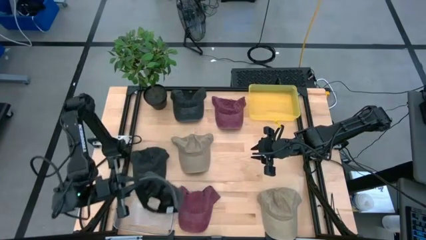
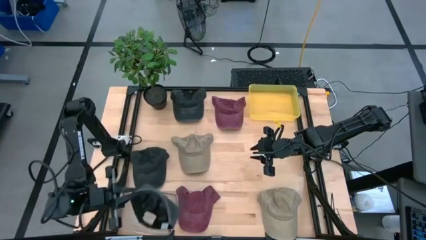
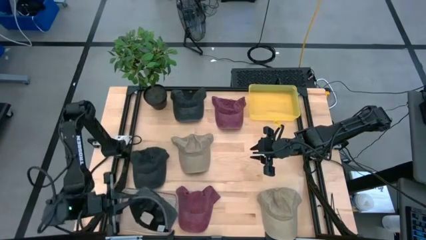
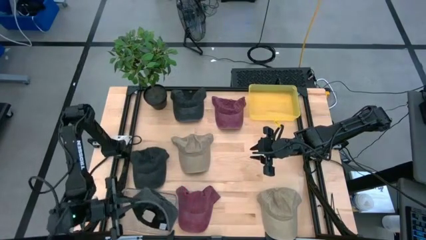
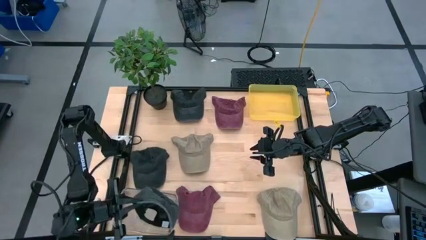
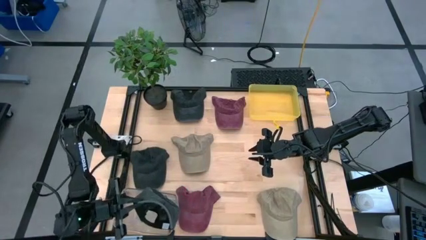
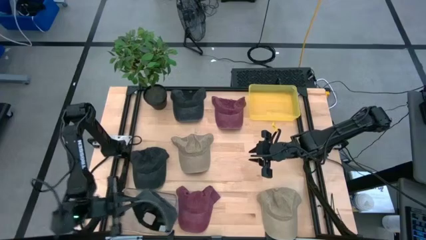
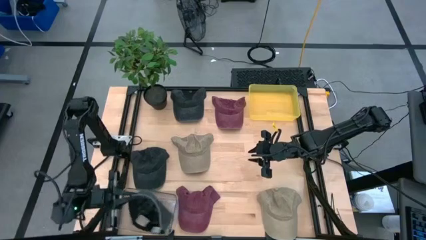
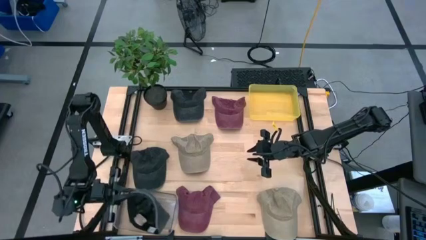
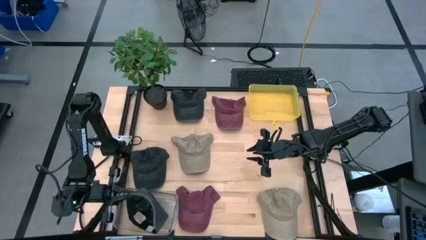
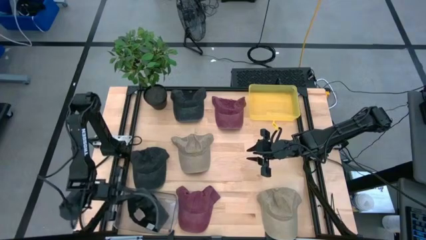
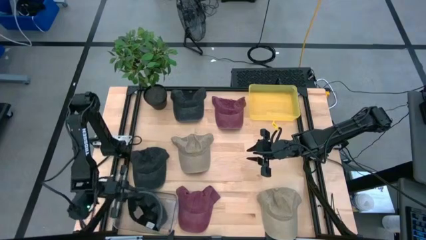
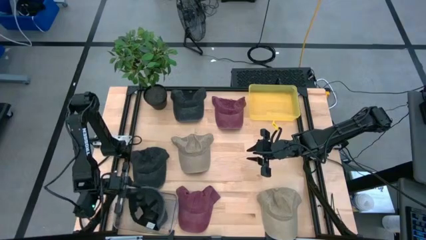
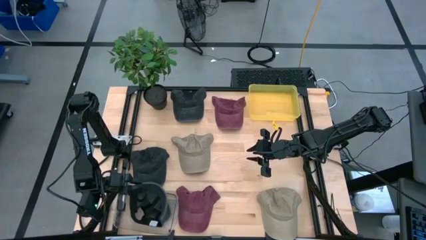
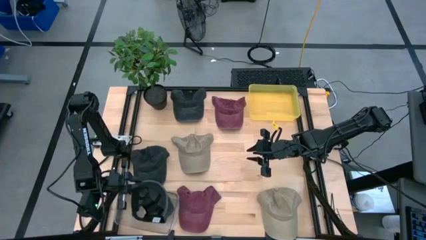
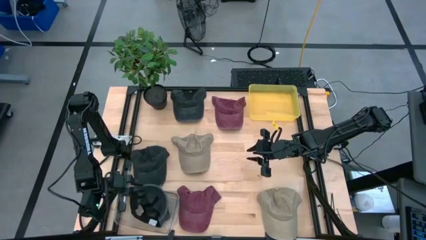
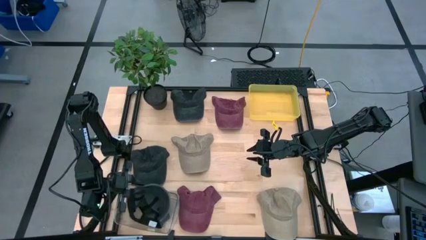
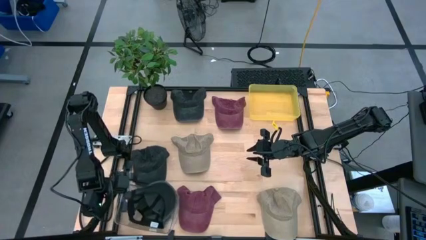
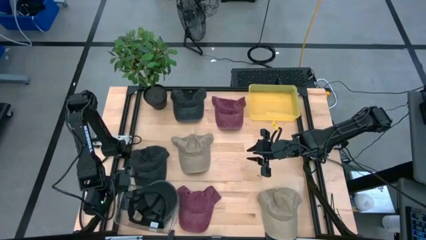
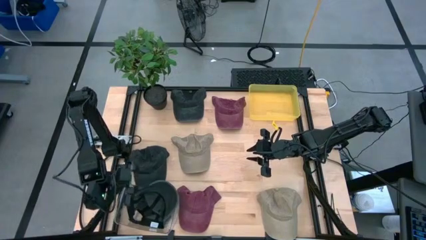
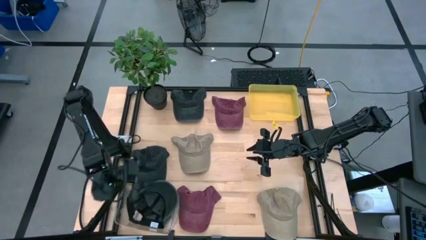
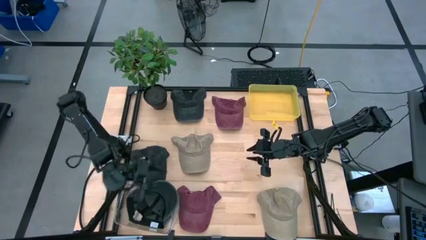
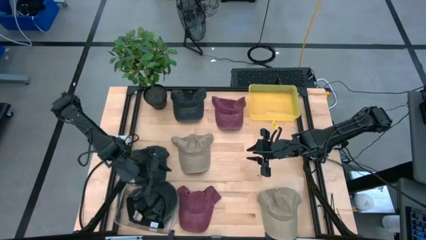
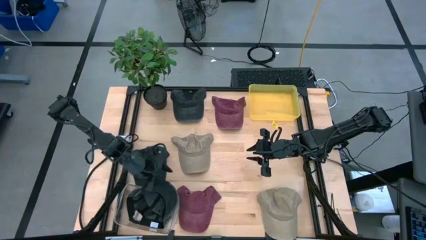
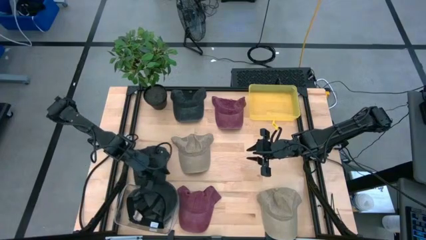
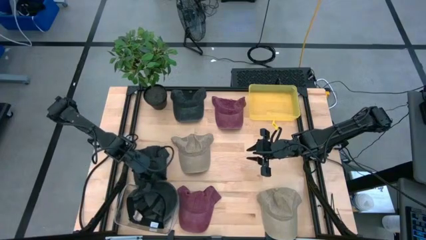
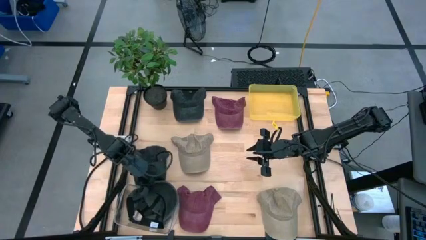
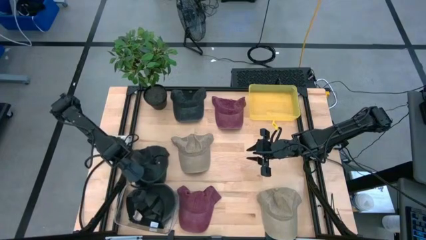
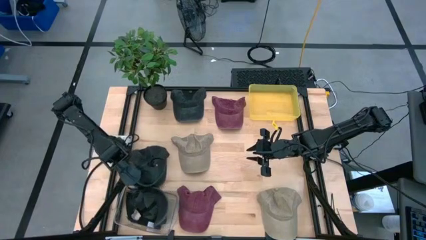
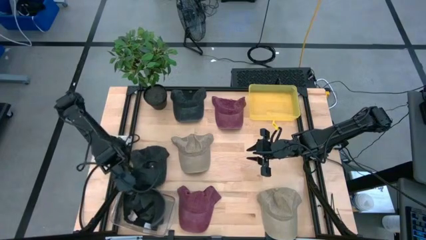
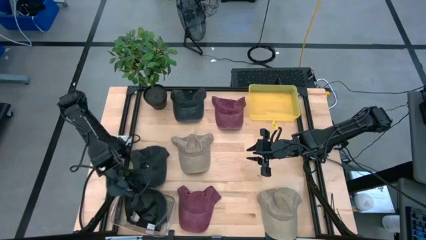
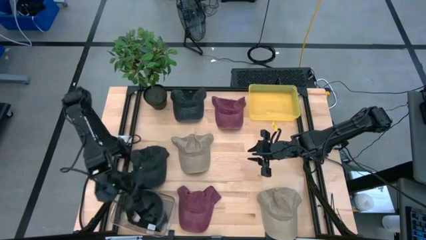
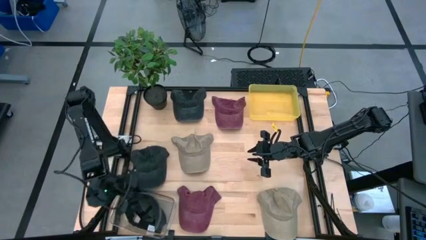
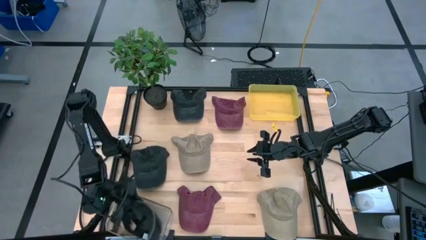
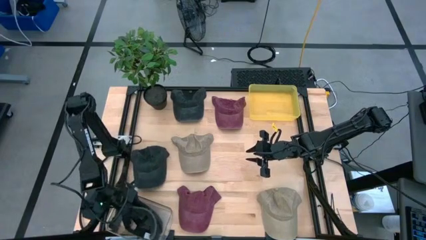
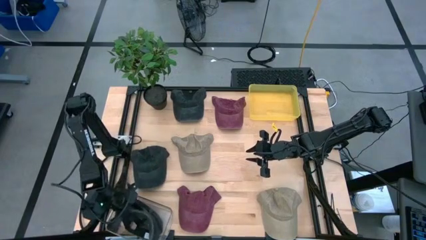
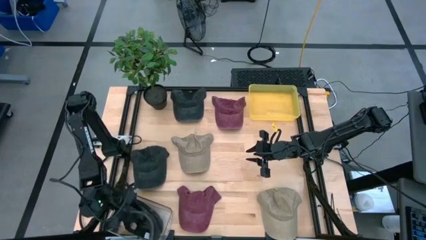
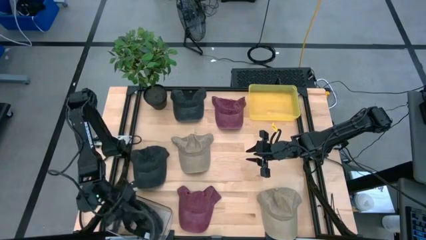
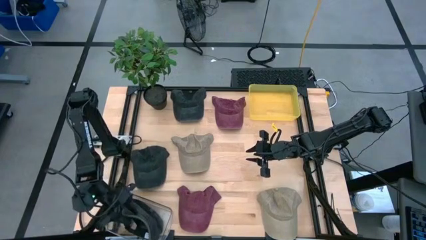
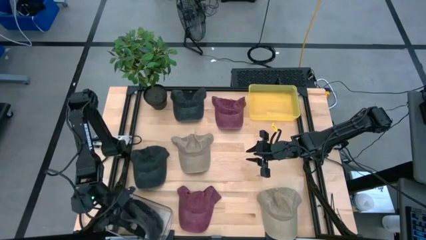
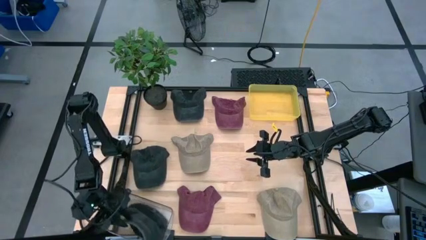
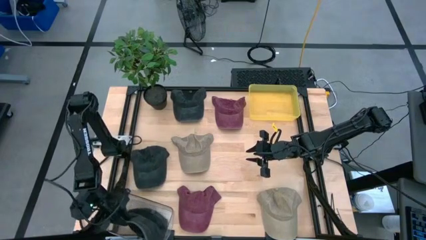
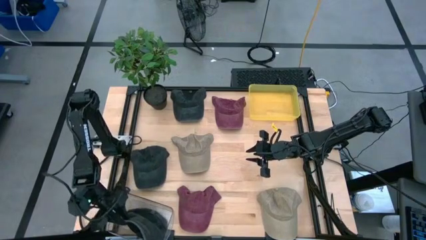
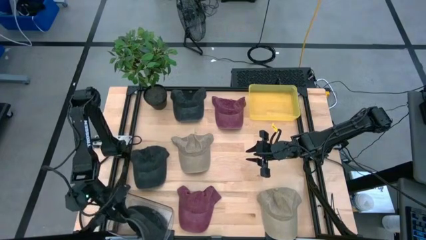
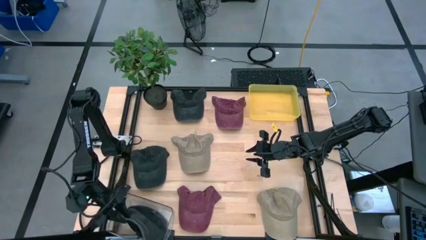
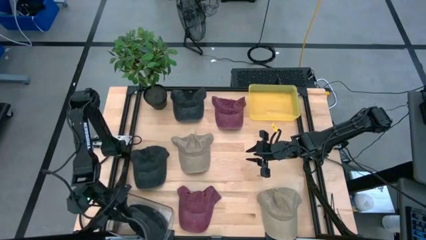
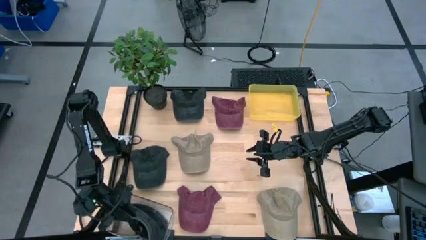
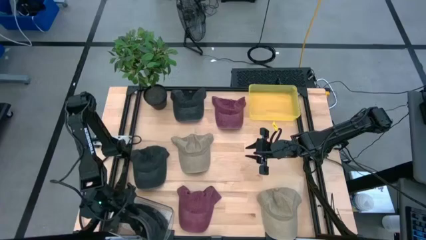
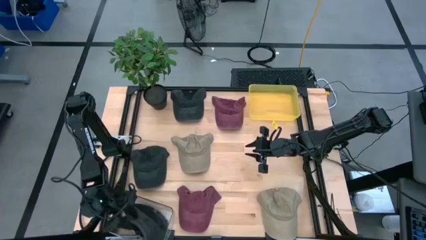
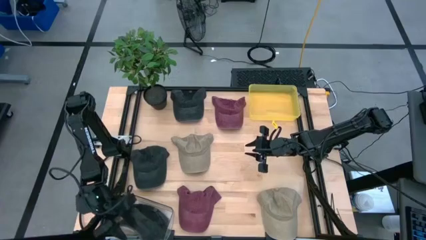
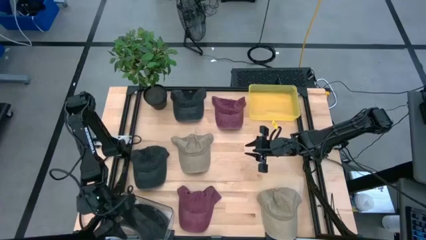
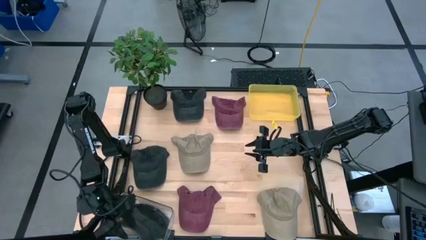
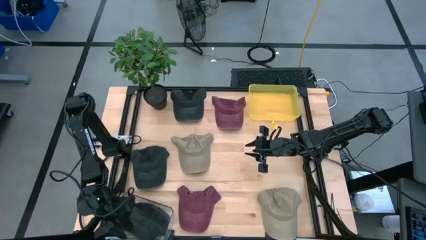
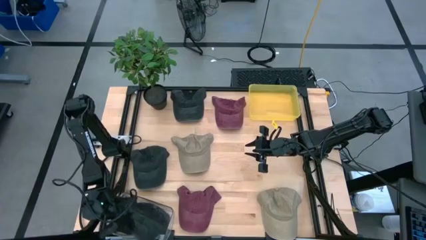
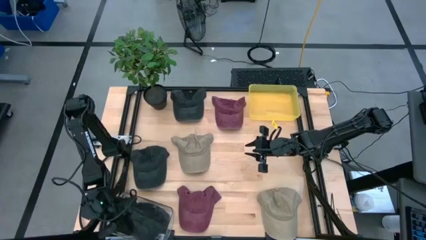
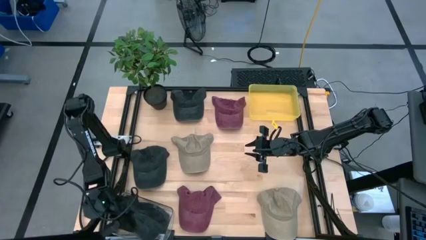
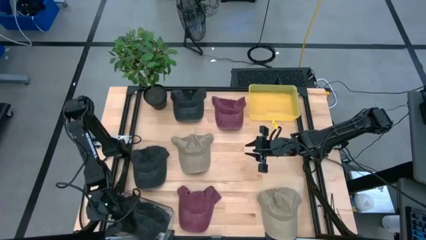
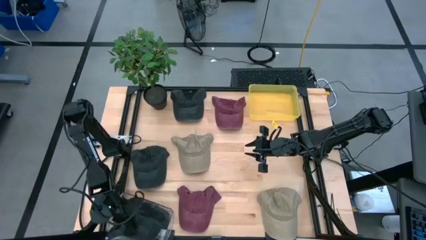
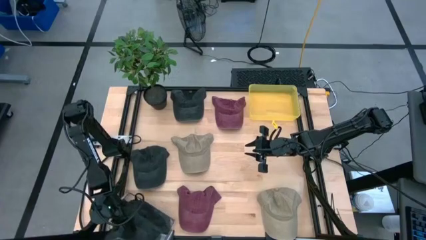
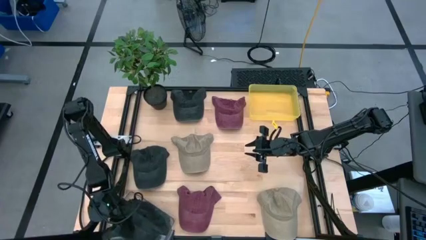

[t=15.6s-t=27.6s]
Task: Pick & Place hat
Put the middle black cap into the transparent bin

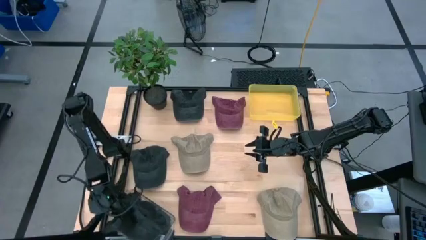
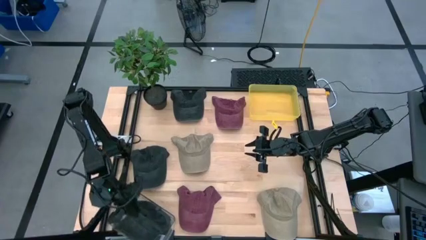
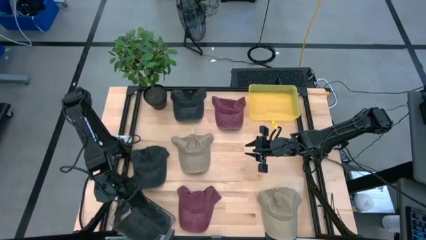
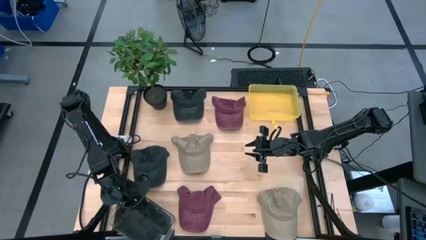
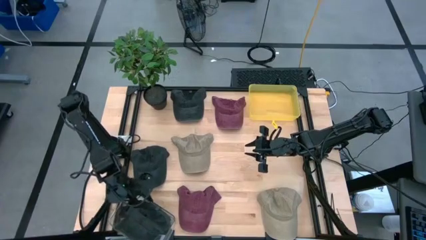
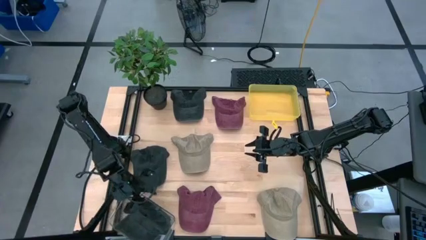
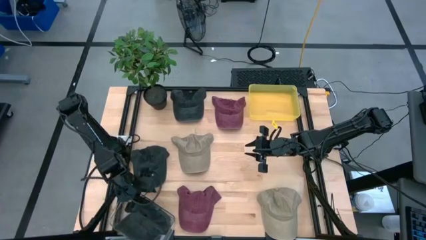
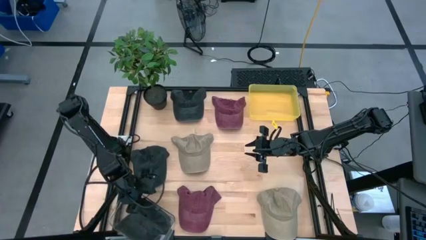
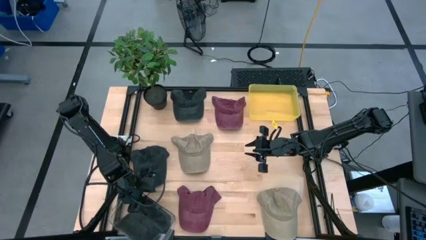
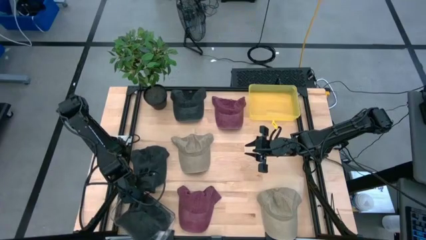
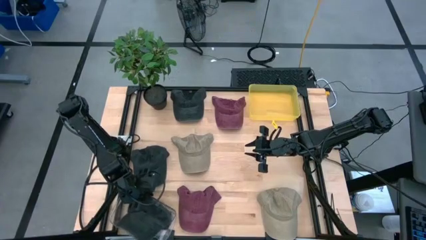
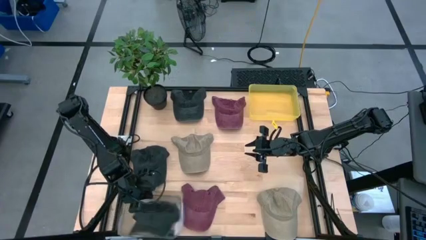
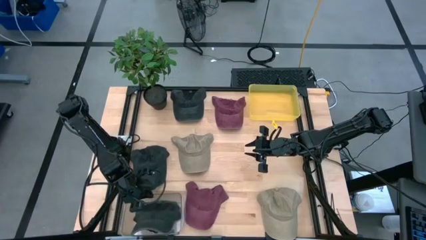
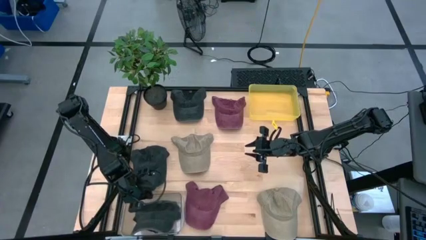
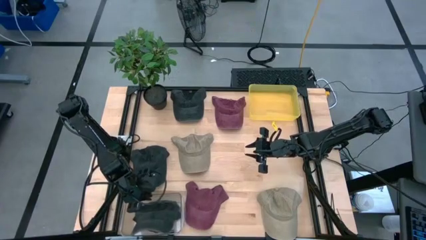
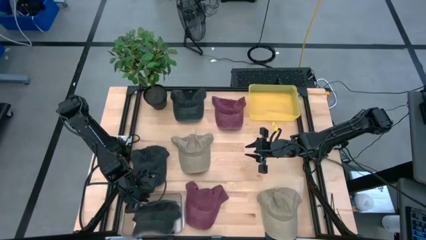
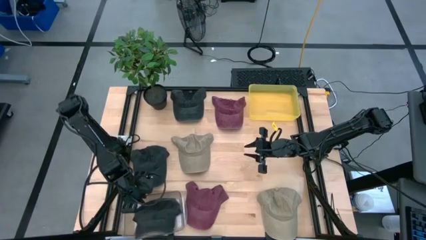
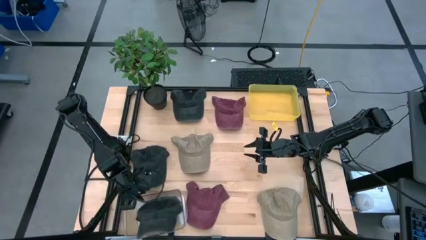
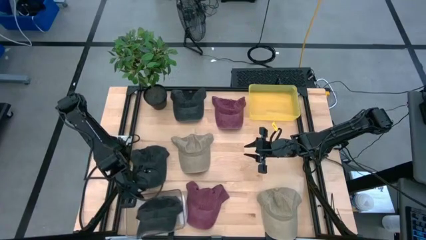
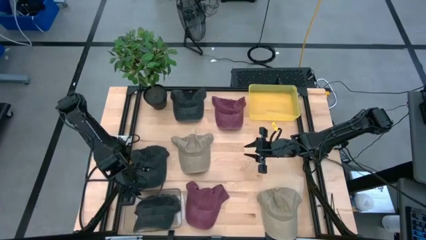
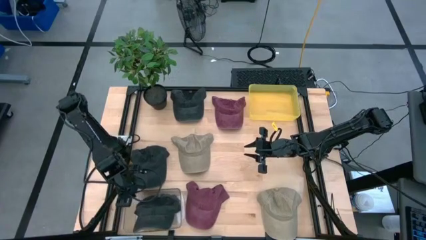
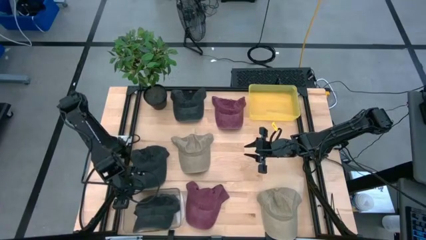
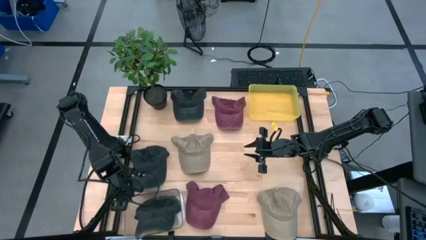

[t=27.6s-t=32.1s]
Adjust the transparent bin
